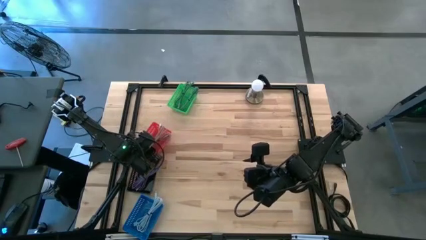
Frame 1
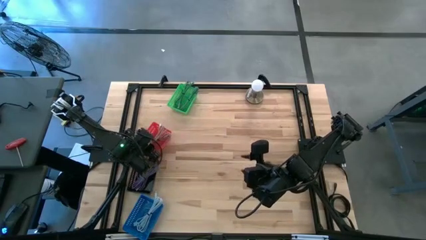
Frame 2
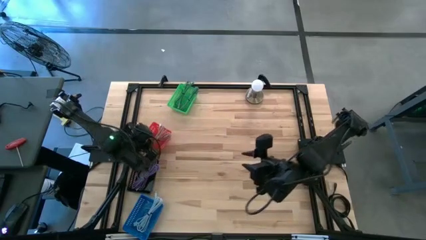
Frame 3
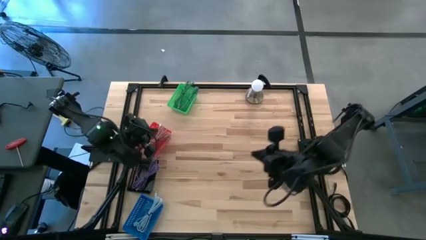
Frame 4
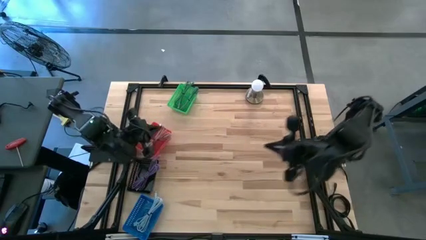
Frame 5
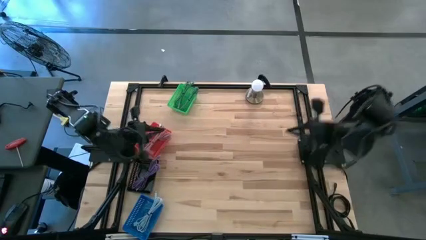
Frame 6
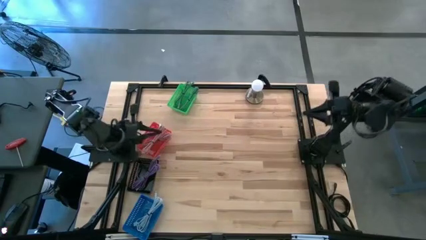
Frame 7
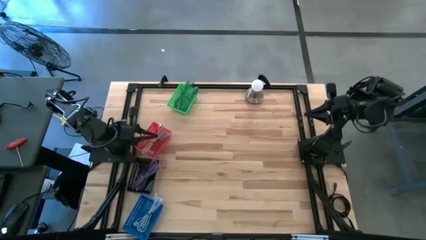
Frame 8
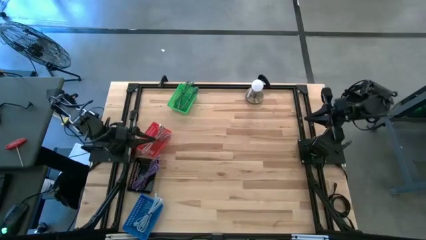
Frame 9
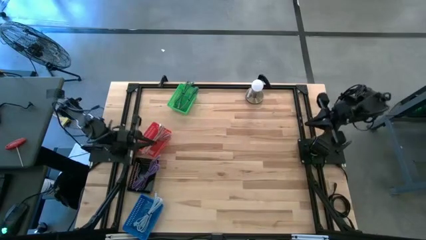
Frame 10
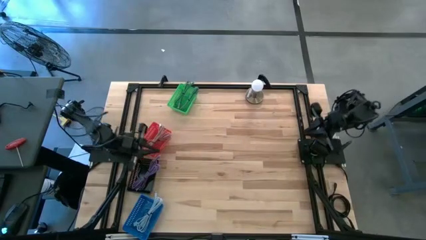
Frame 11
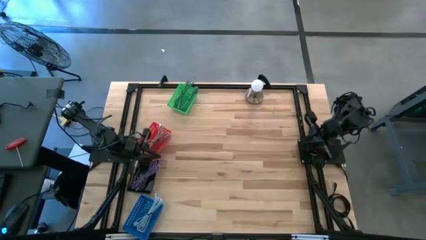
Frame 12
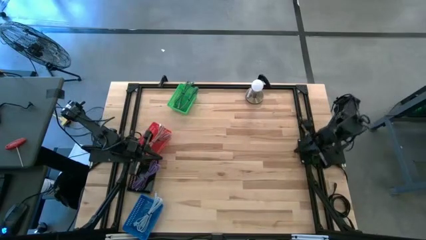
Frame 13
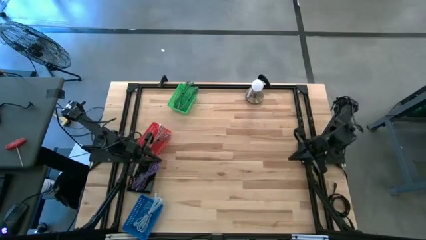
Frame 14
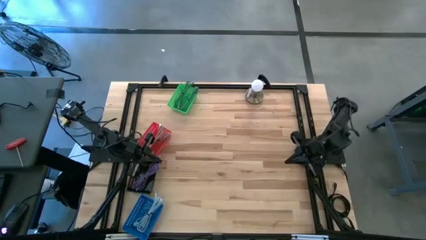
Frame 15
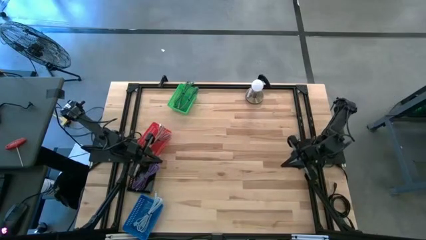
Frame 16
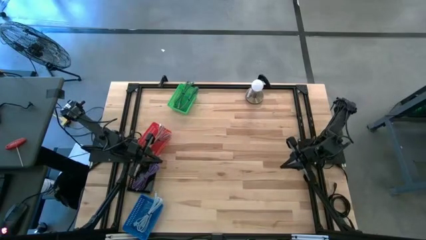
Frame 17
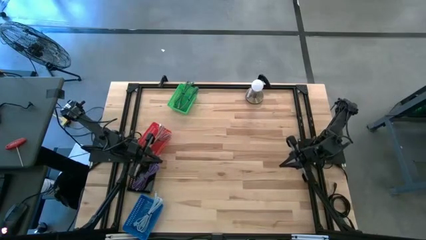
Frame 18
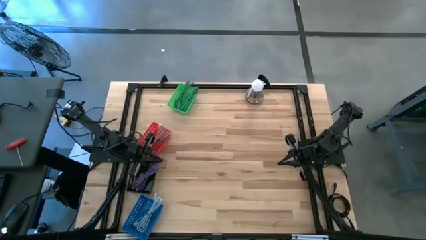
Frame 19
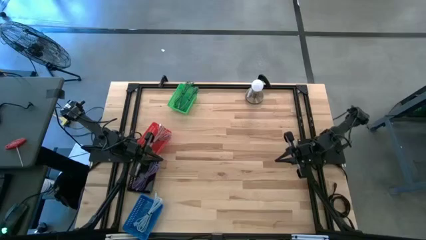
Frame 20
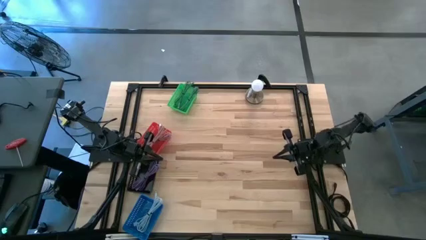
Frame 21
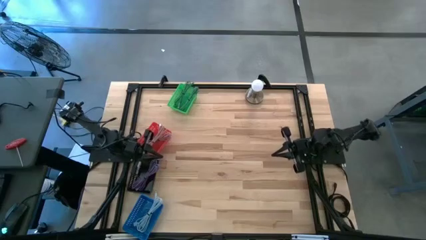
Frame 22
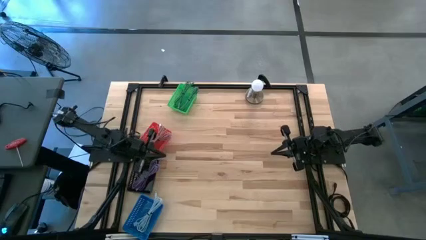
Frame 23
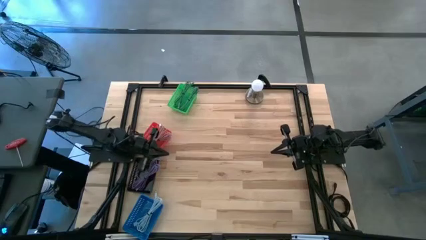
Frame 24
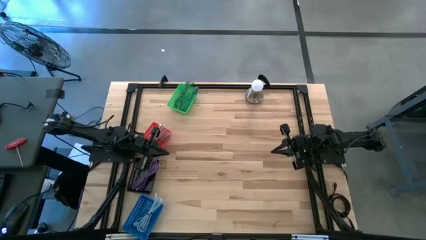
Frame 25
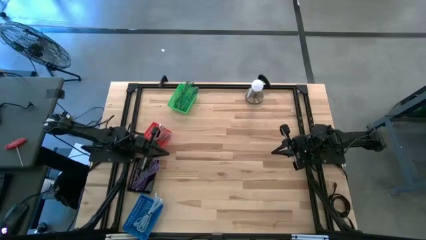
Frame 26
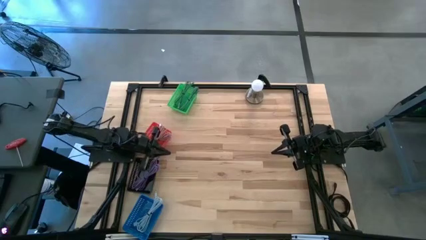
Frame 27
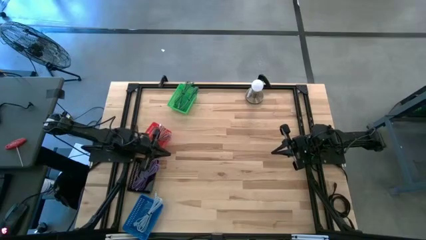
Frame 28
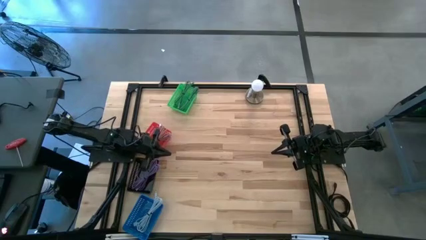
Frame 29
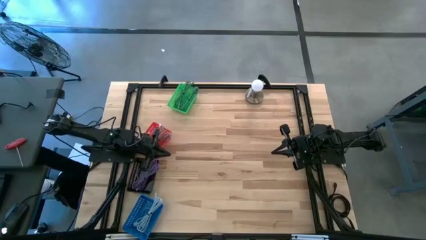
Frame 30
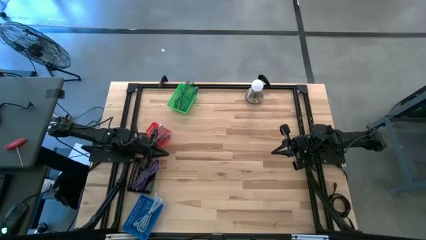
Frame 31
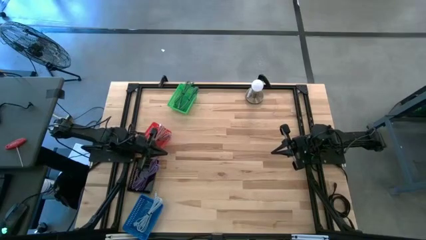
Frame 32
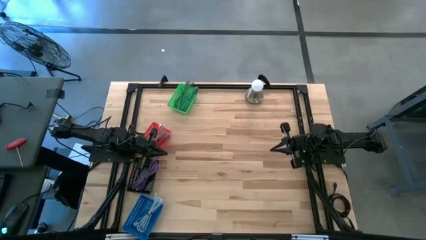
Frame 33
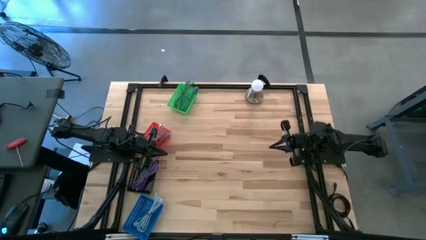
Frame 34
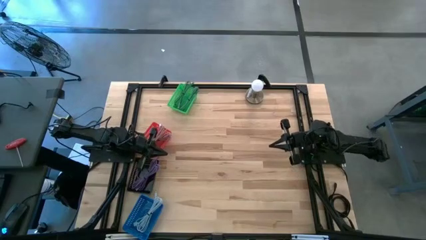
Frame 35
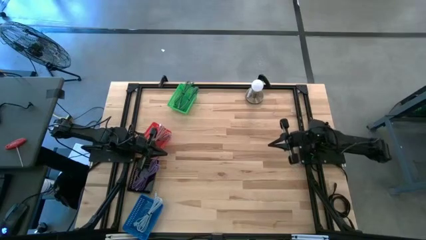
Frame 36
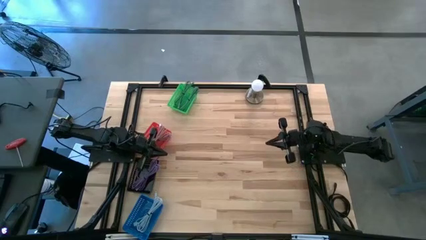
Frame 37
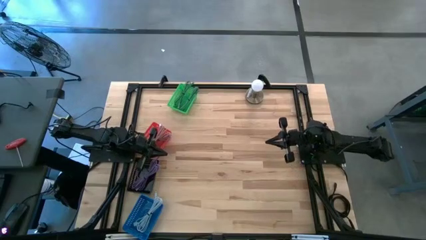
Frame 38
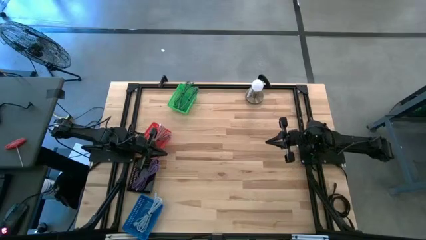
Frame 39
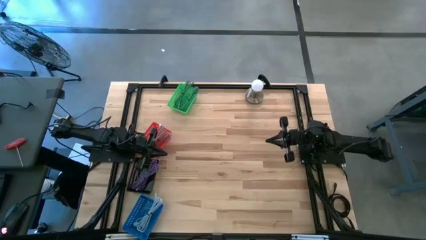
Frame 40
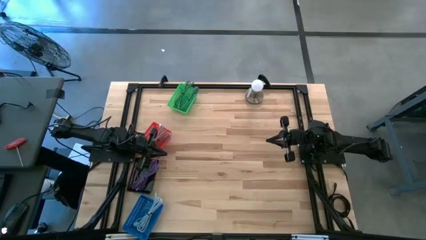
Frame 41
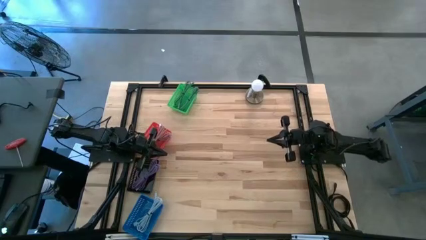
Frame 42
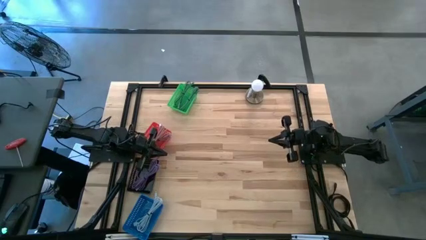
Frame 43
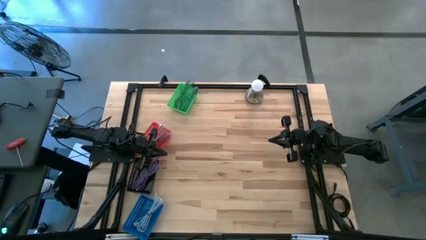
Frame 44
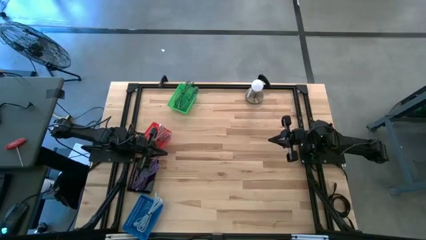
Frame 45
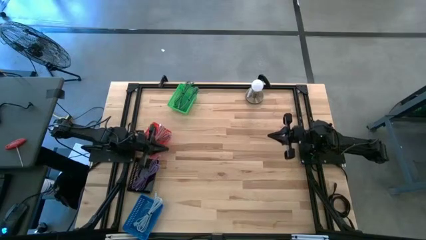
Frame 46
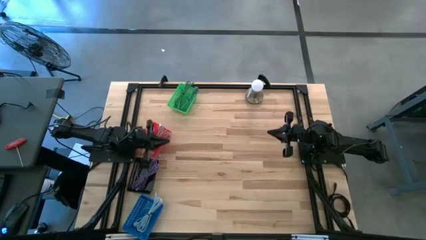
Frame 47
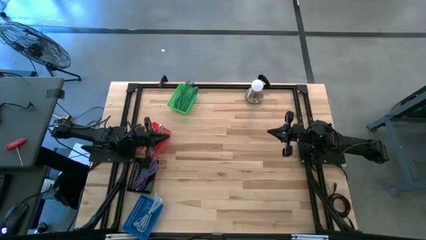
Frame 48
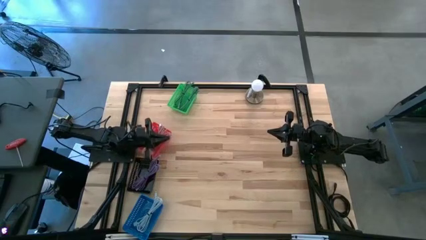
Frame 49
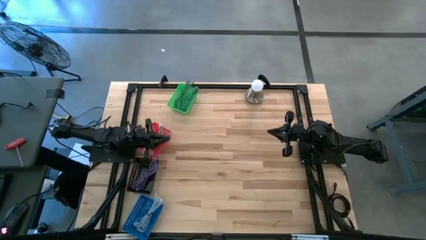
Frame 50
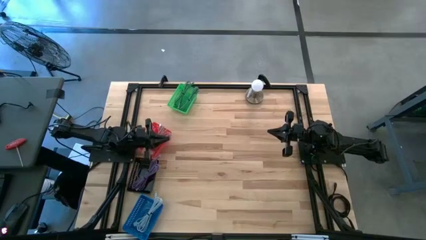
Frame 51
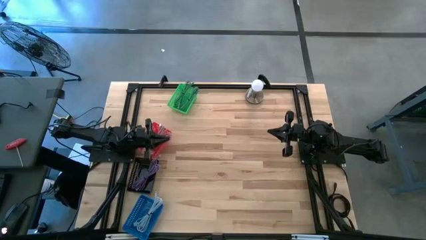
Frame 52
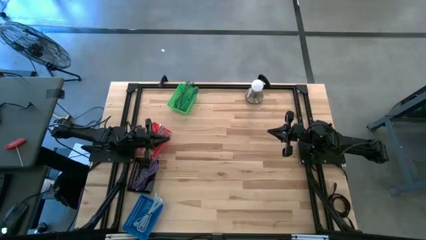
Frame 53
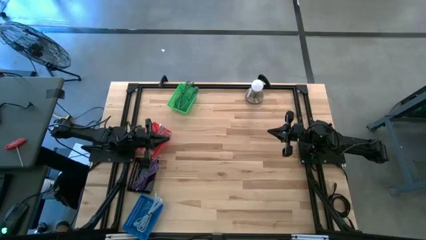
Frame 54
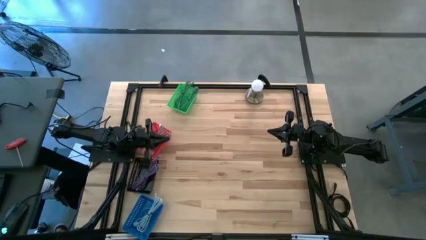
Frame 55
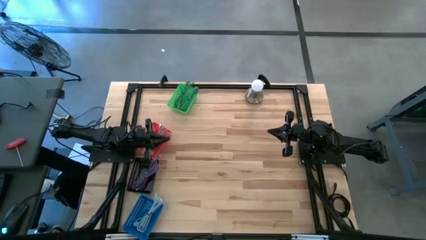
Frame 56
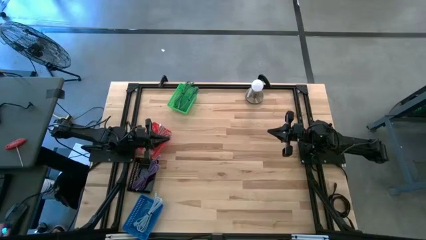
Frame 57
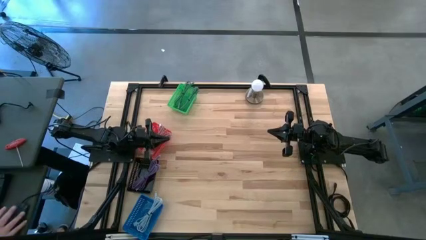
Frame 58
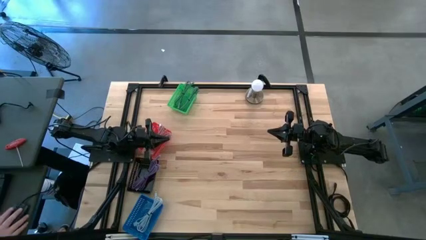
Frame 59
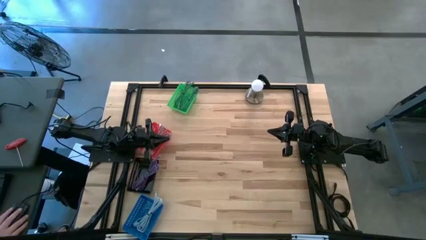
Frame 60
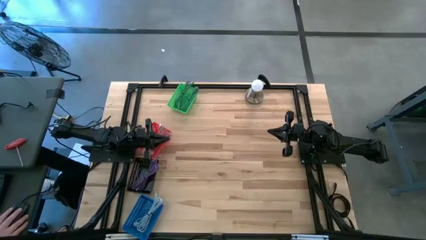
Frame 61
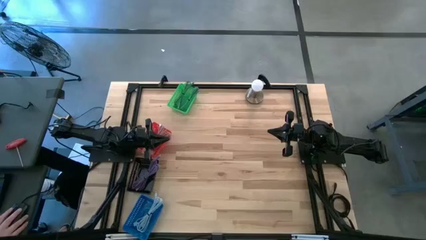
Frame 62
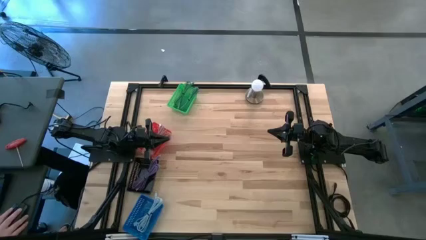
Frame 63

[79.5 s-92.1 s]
Task: Pick & Place USB Port
Return to Home Position

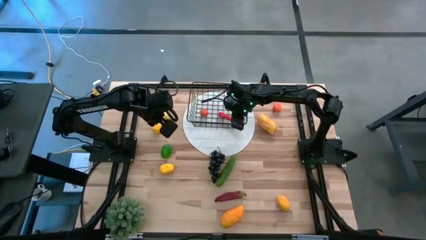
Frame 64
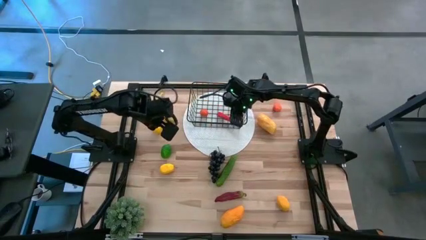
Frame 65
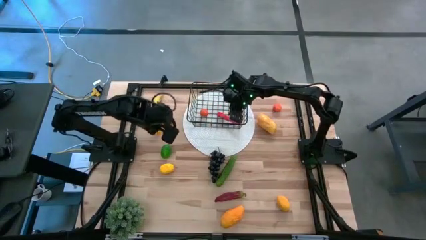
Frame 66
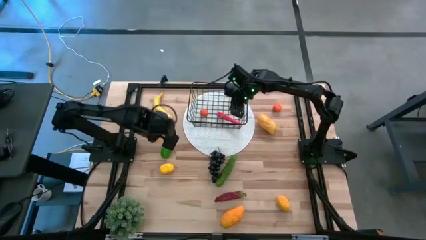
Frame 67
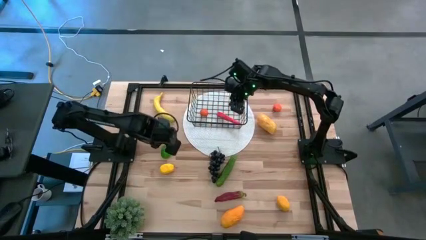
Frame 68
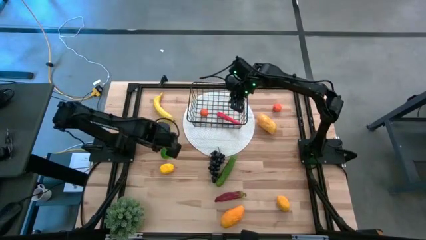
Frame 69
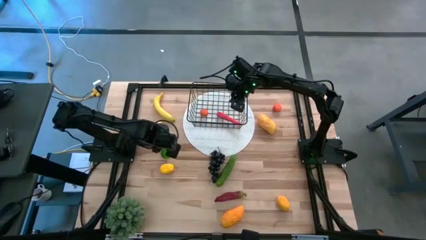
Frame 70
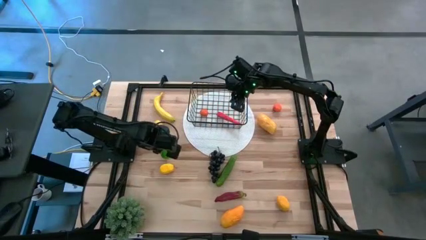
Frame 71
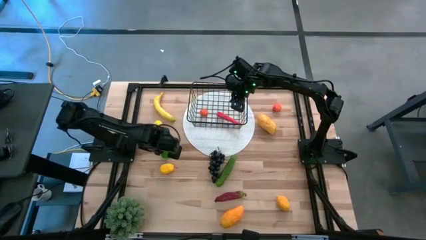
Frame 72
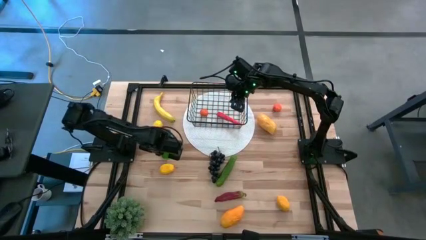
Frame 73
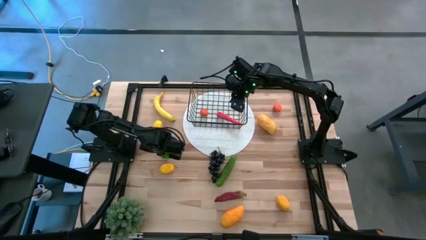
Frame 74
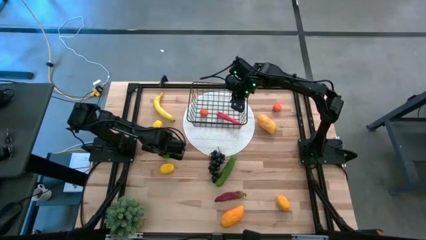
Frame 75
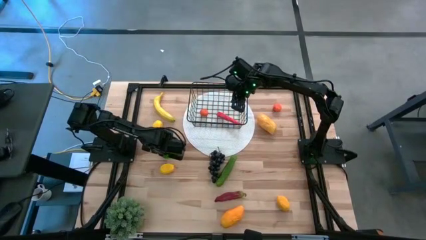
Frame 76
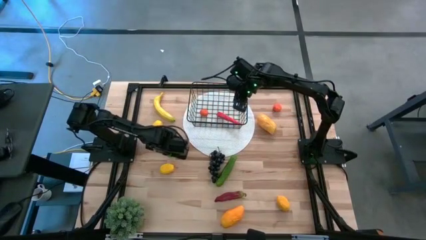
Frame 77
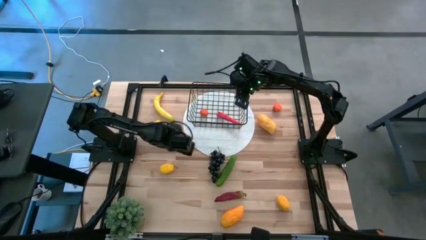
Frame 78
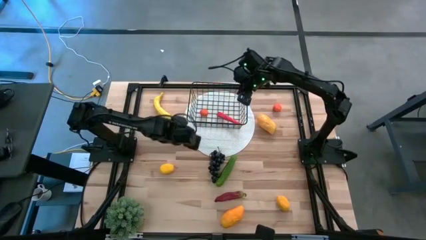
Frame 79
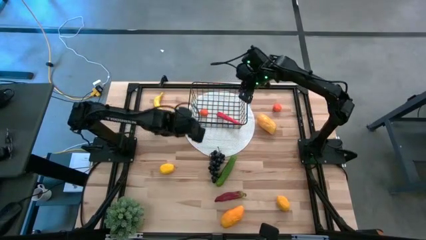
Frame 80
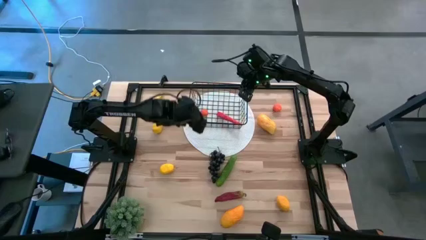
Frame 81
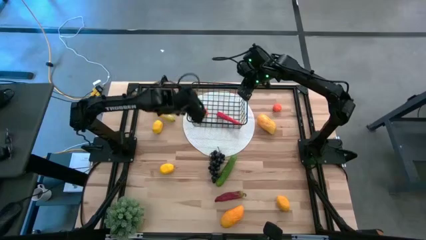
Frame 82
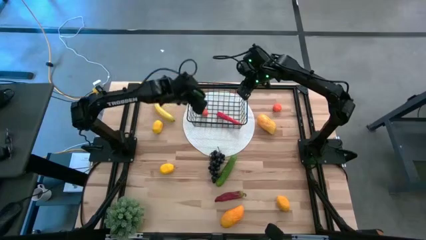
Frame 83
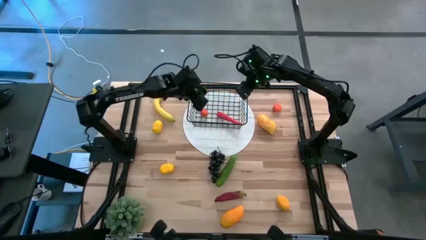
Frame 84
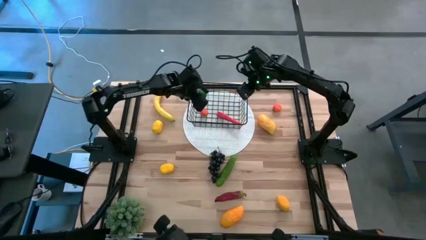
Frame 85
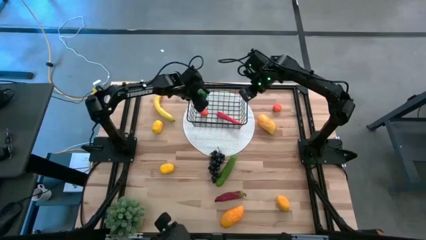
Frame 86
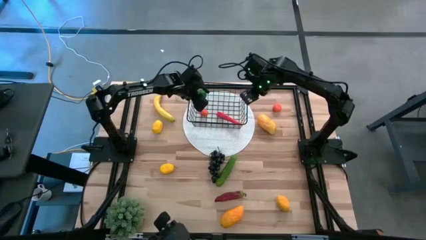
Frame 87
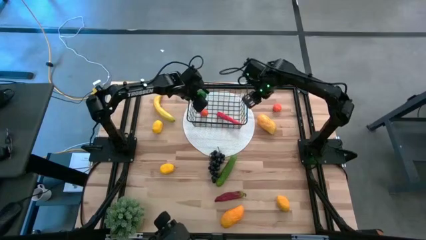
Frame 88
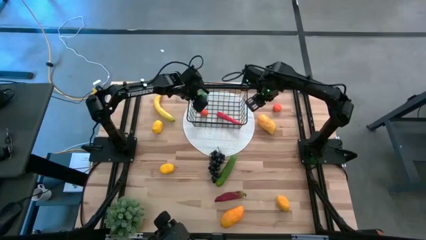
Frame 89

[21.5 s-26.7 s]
Task: Build produce basket
Put the green lime into the black wire basket
